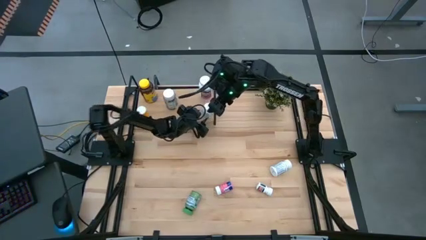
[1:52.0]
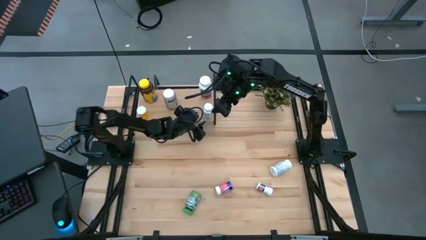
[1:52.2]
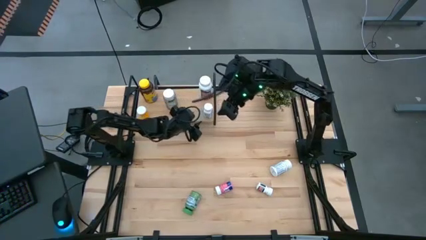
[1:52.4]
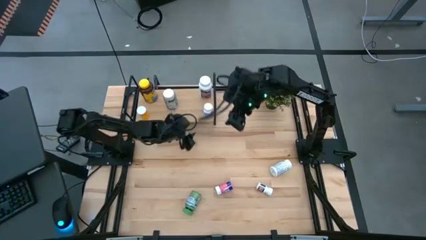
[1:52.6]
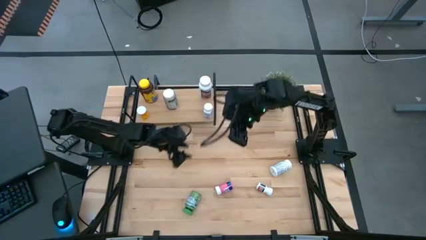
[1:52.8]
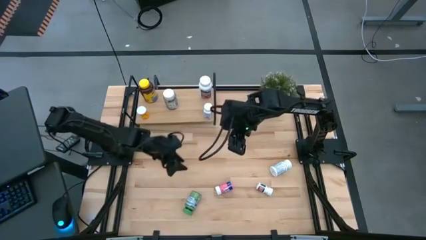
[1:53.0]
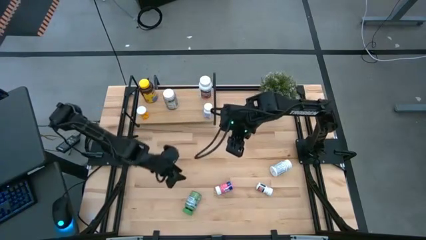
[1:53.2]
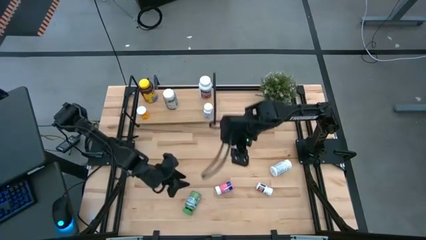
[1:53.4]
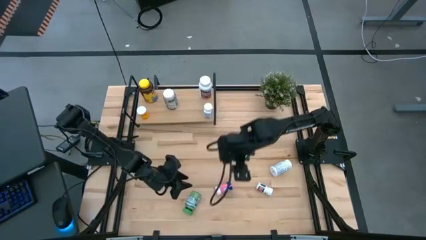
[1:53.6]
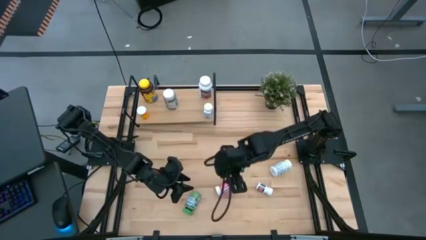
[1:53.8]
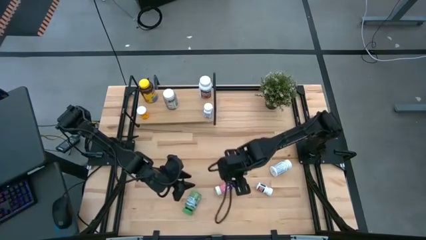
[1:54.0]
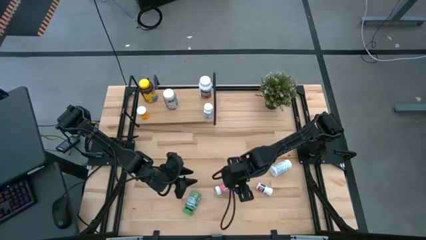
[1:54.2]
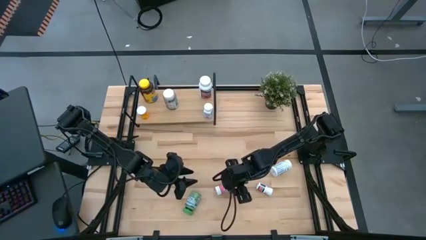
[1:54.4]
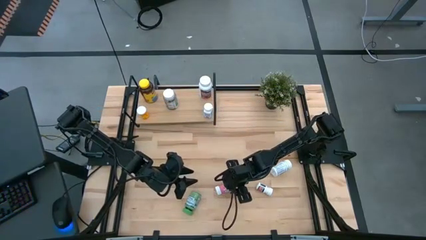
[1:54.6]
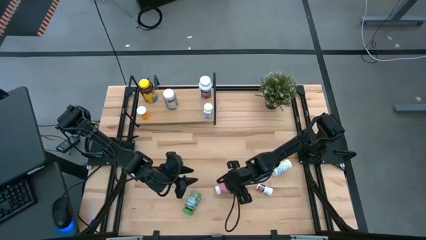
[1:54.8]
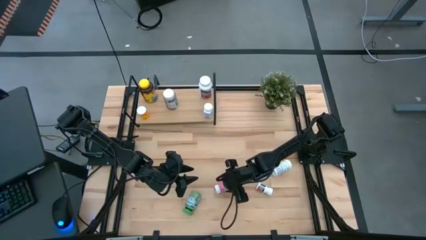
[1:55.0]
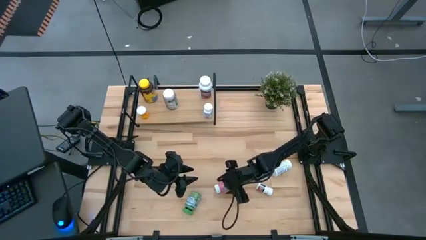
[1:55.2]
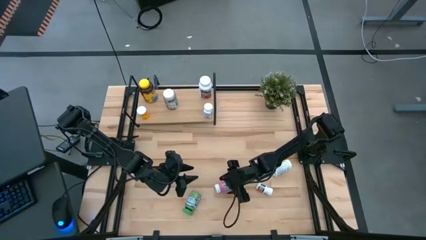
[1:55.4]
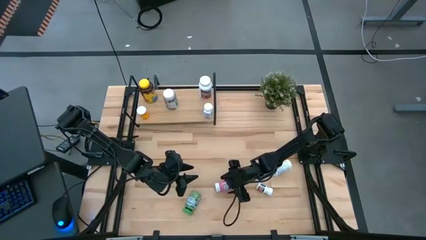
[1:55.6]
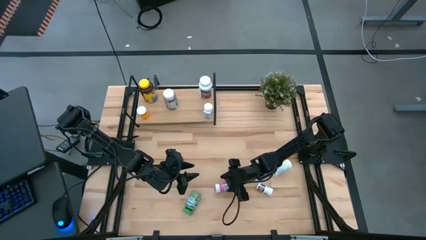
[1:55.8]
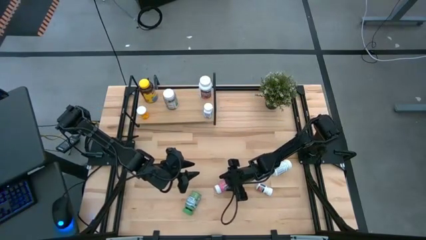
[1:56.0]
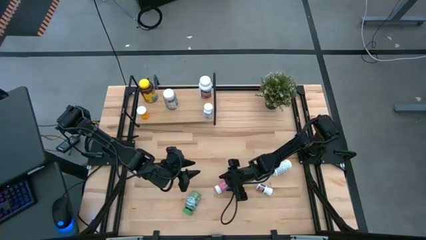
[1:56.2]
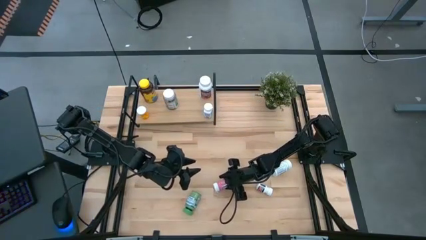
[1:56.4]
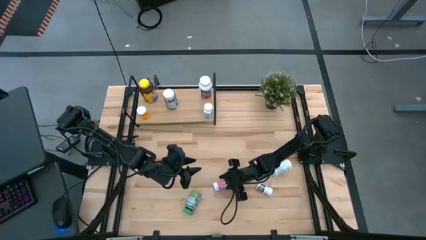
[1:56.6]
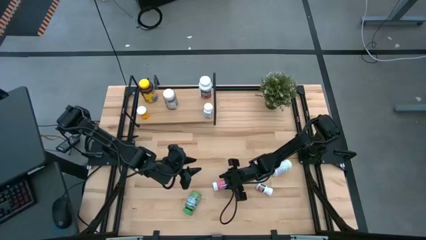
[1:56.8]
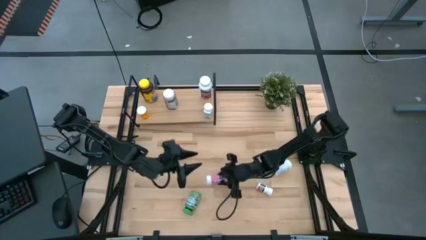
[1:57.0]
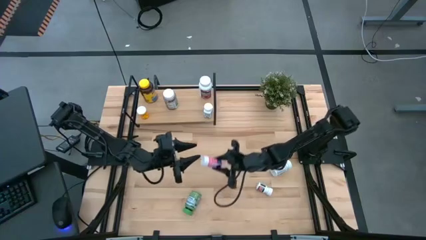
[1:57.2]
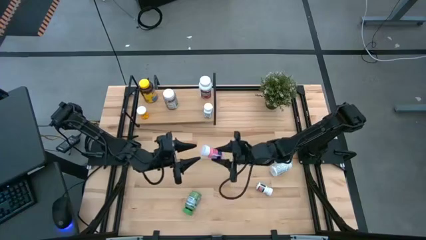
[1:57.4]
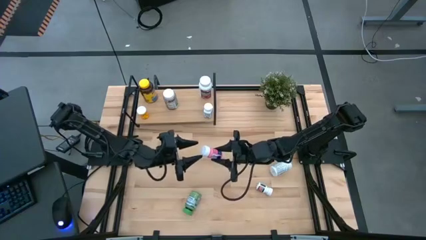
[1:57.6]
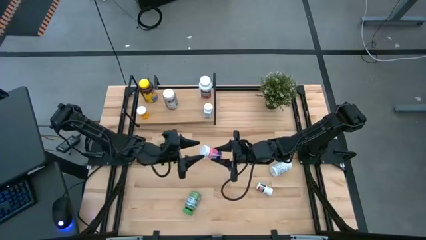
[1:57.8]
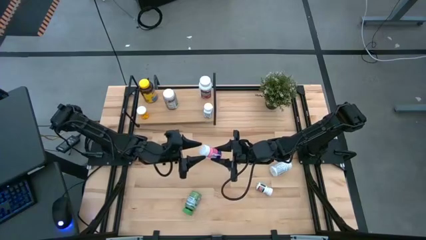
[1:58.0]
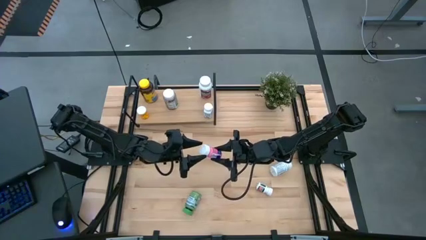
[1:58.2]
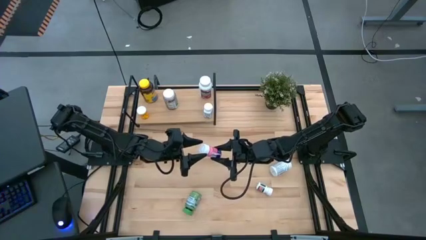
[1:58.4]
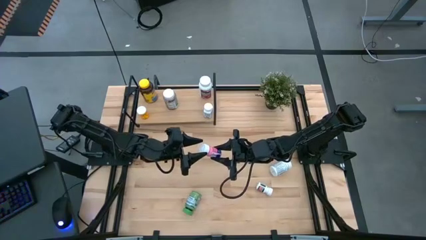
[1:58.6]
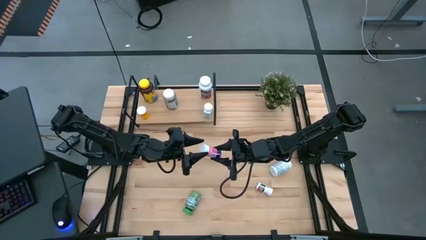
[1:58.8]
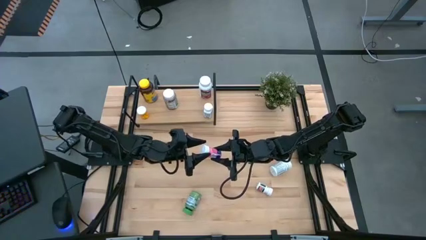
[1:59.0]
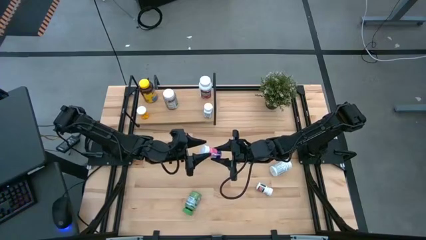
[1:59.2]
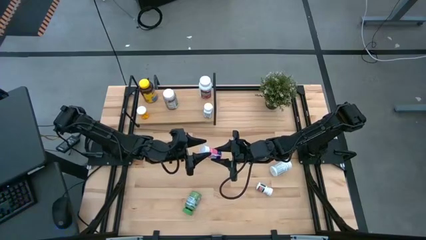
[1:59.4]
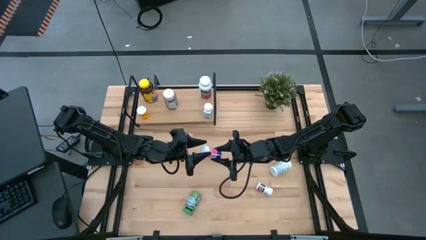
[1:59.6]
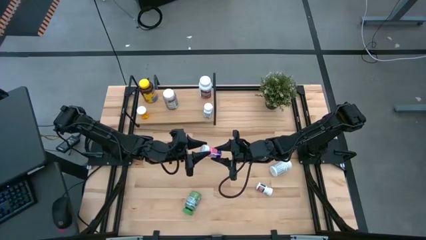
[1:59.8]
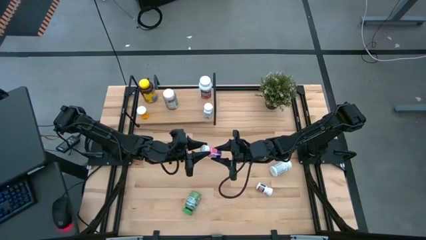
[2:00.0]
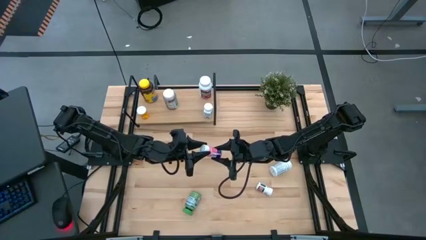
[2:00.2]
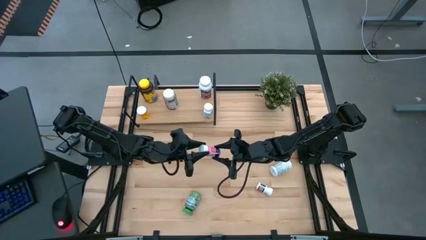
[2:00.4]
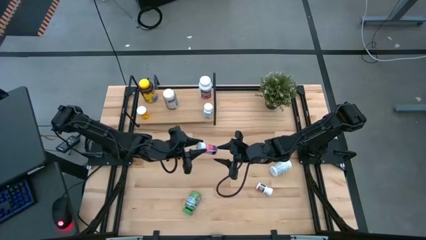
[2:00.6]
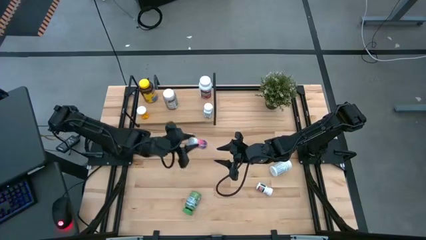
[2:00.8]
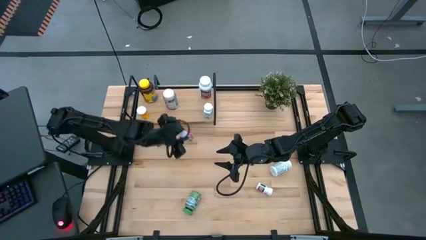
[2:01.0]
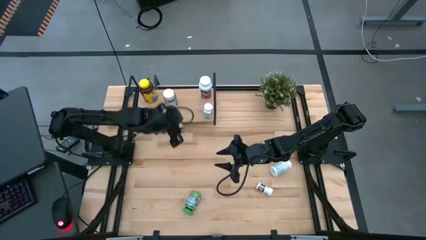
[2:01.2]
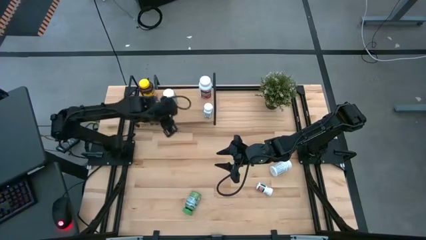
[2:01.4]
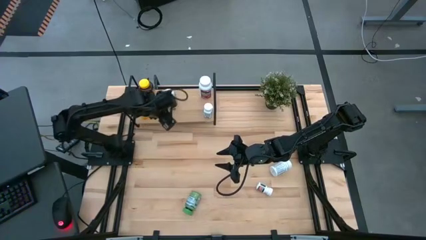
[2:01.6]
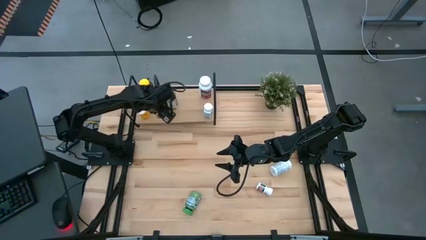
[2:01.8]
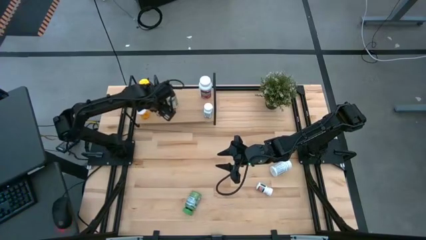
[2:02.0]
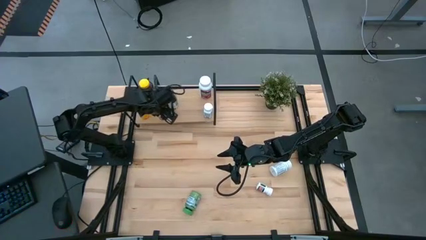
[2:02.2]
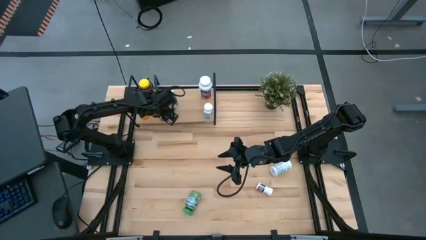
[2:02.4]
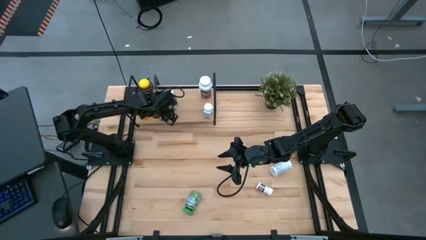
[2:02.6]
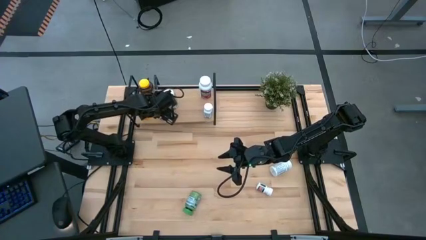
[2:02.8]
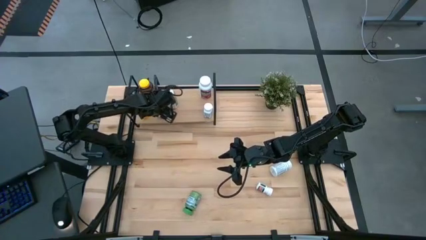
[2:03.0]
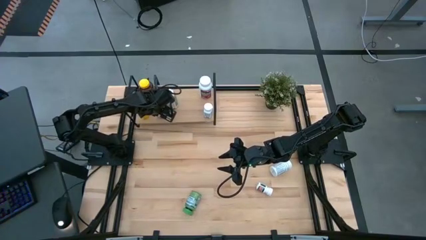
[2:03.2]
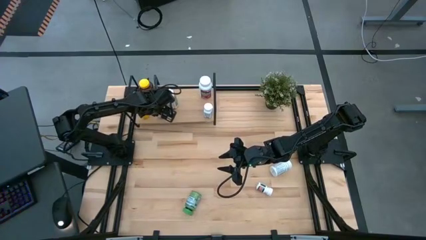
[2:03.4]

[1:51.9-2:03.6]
Task: Pick and place medicine bottles onto shelf by color
Put the pink medicine bottle on the shelf

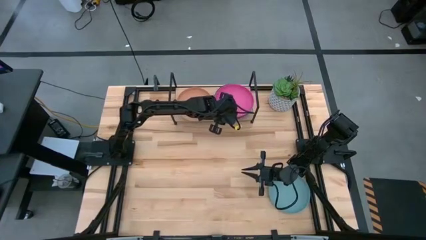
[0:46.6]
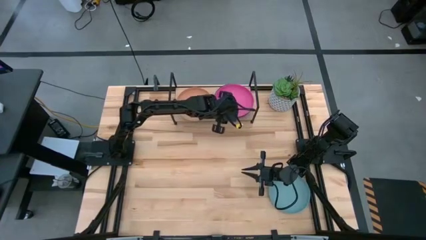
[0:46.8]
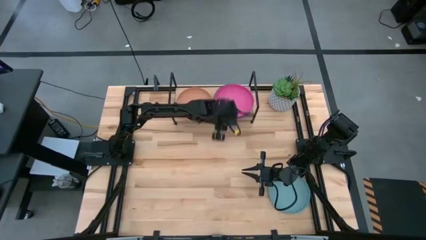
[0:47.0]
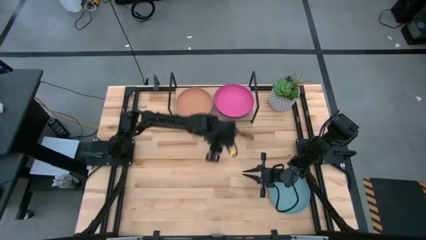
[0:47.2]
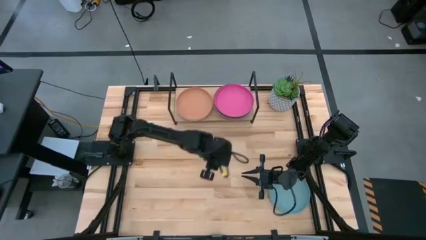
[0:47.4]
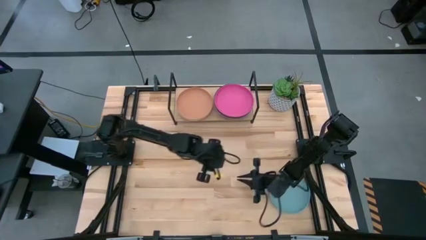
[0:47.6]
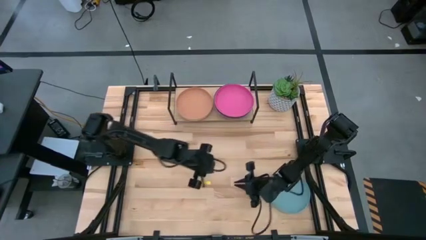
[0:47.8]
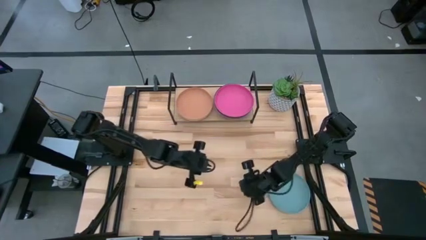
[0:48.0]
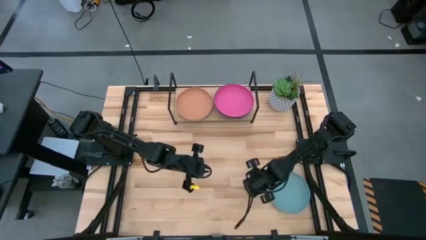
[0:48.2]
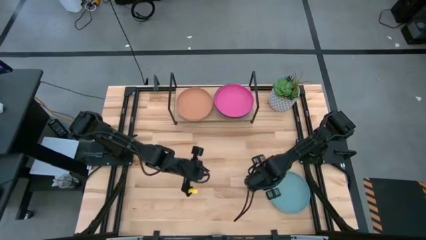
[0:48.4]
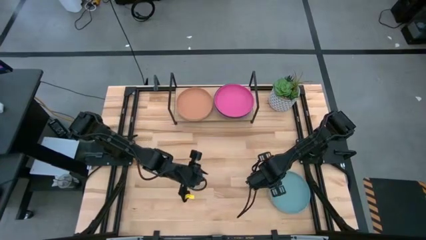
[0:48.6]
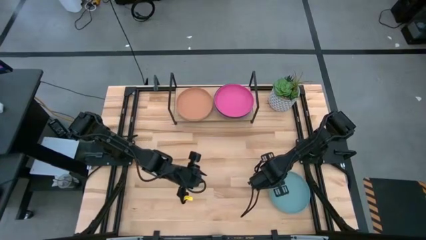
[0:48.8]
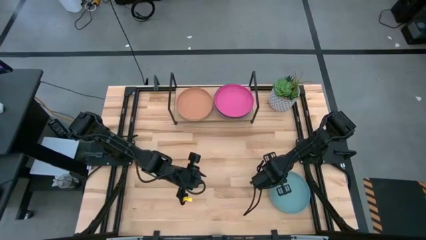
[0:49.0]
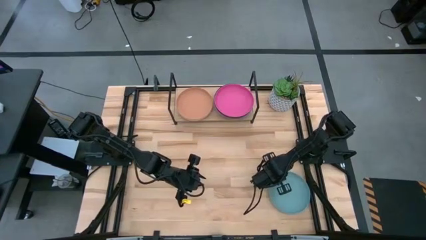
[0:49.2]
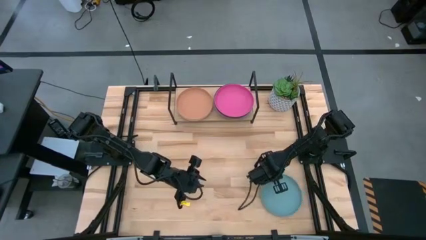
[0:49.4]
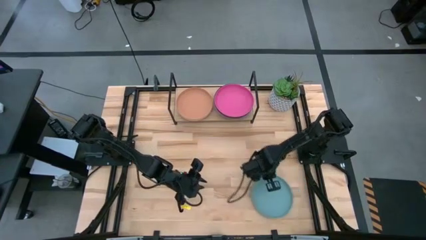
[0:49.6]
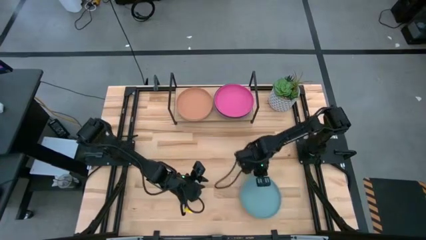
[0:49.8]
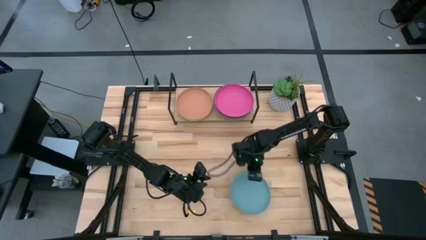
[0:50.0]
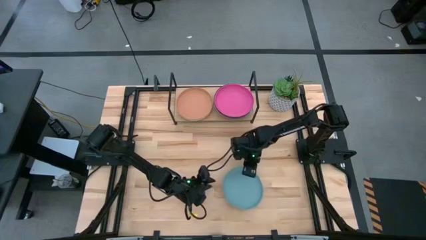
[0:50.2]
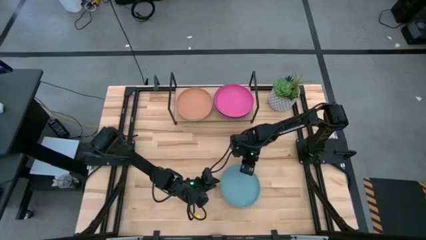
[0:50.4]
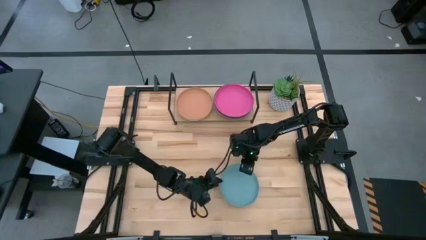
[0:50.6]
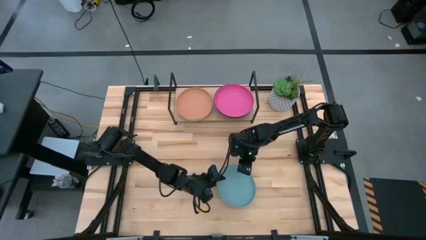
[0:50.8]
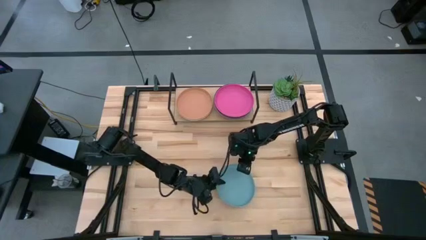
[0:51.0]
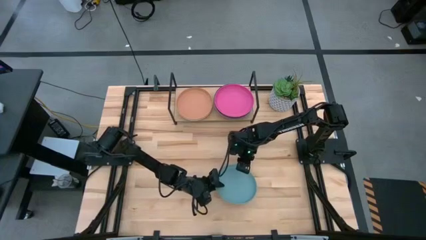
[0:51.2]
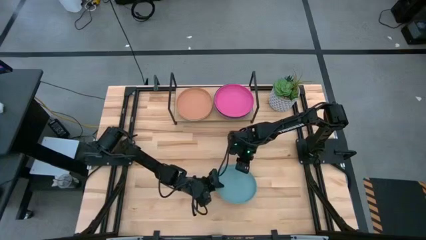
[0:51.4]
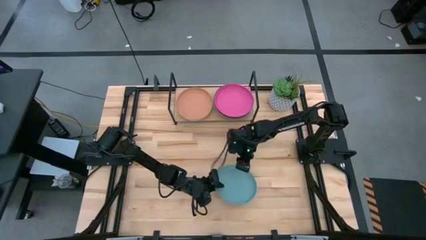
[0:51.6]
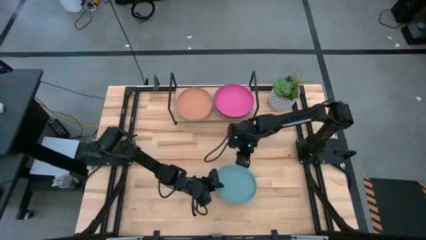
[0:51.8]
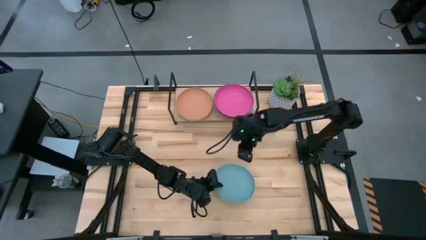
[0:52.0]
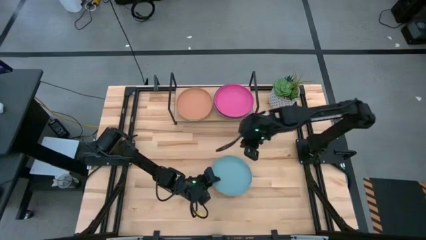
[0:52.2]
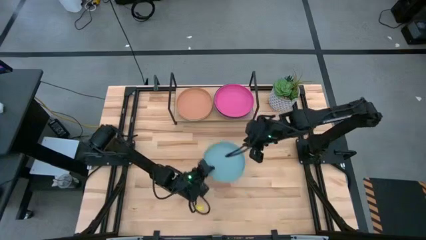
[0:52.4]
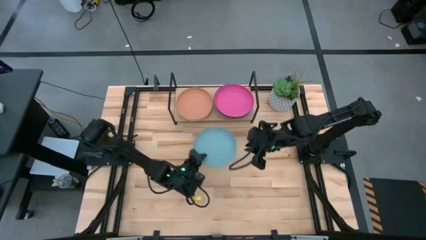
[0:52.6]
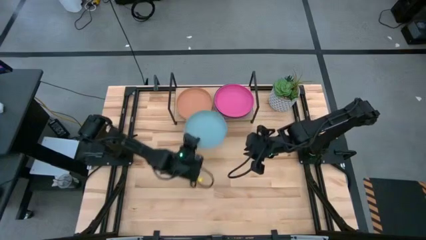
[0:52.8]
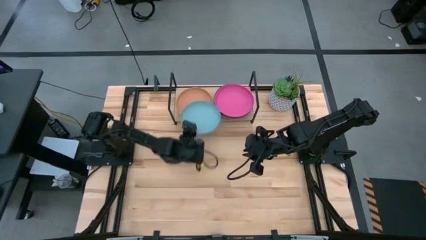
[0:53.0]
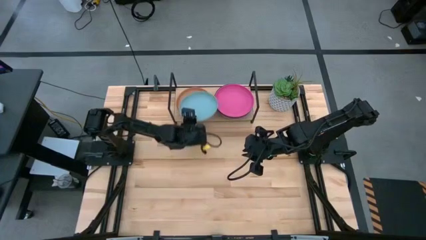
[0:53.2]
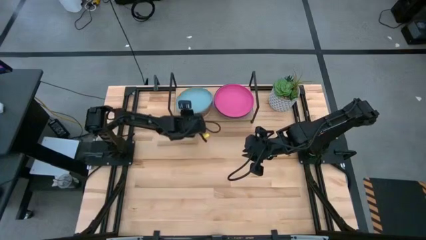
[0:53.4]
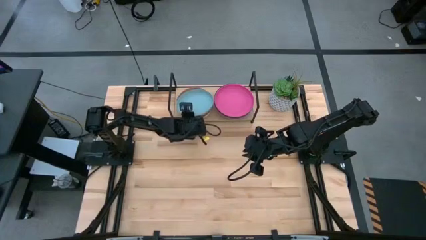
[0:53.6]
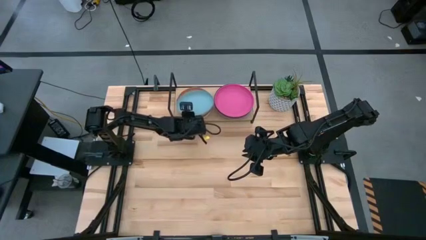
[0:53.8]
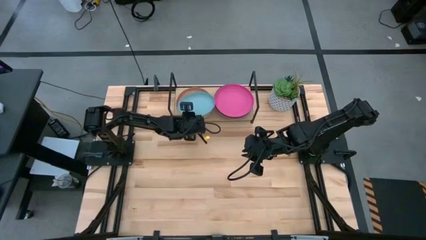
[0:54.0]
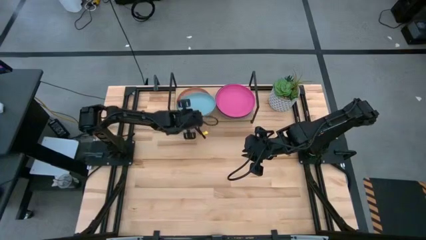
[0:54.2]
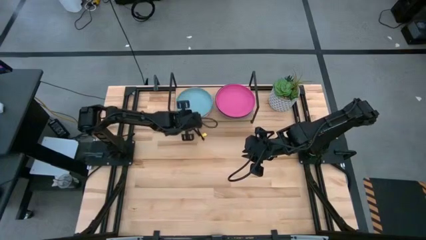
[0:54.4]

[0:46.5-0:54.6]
Task: Place and stack plates onto a shelf
Stack the light blue plate on top of the the brown plate on the shelf
